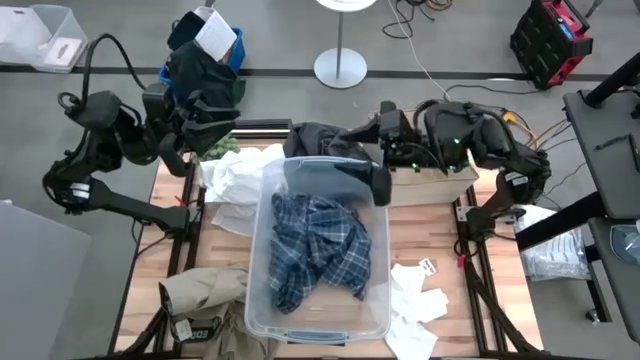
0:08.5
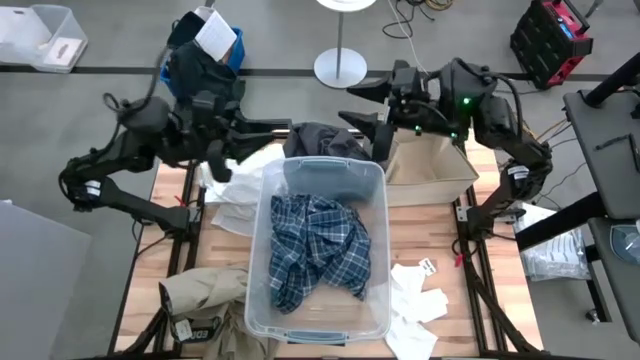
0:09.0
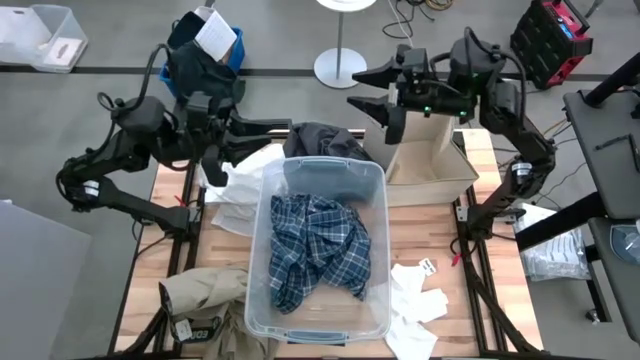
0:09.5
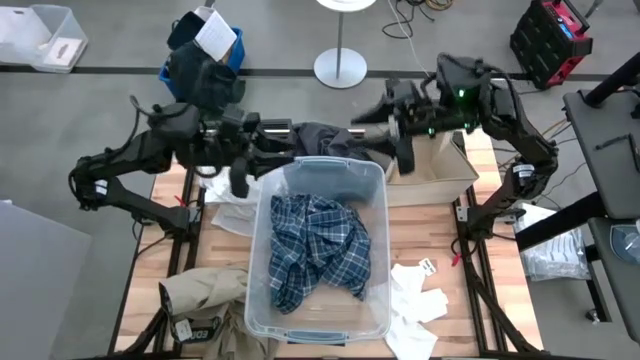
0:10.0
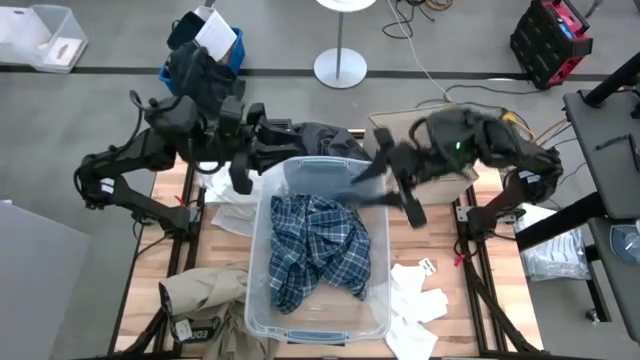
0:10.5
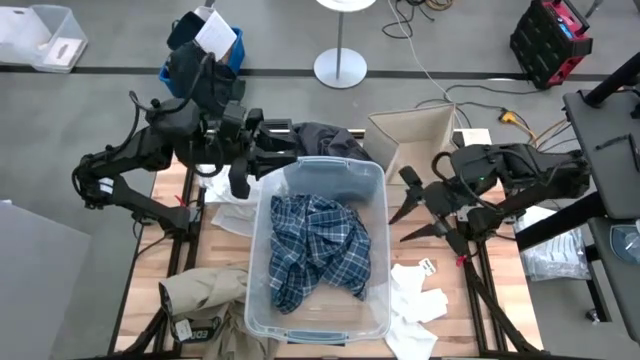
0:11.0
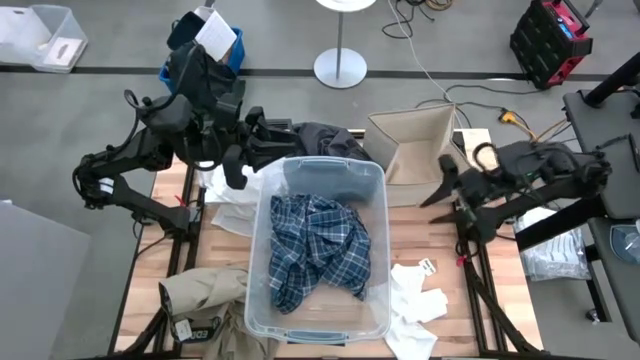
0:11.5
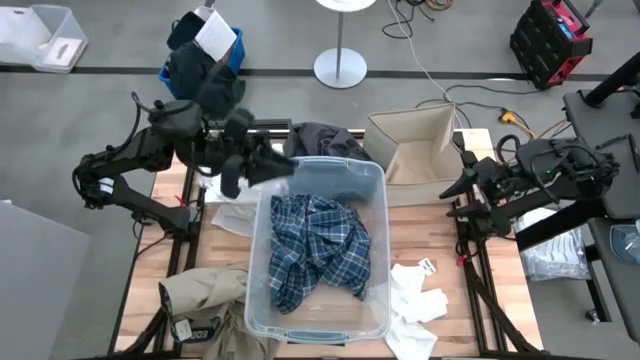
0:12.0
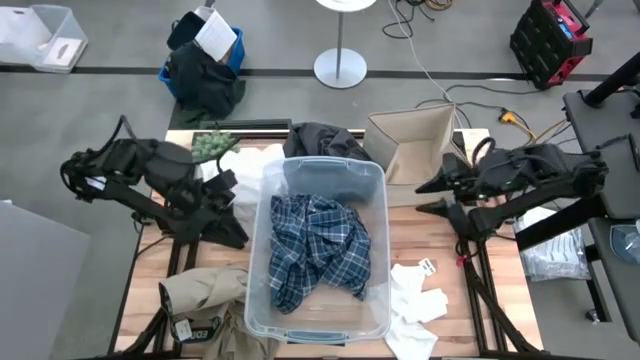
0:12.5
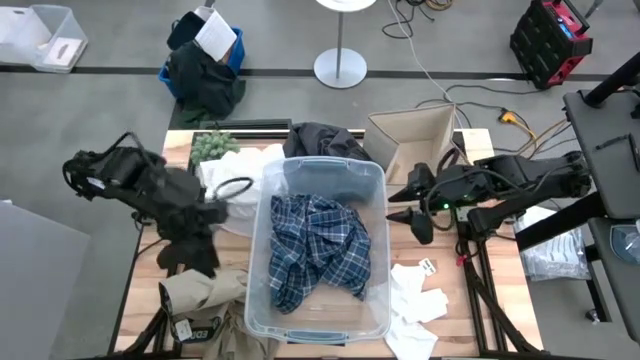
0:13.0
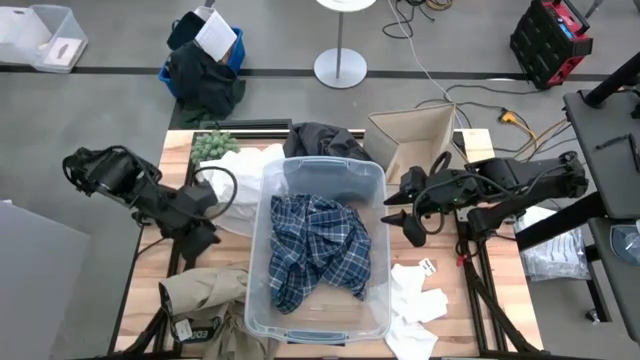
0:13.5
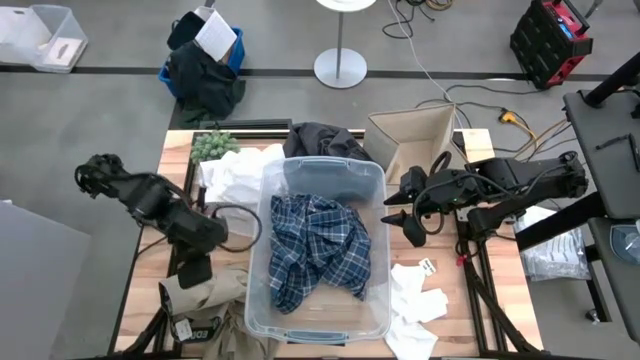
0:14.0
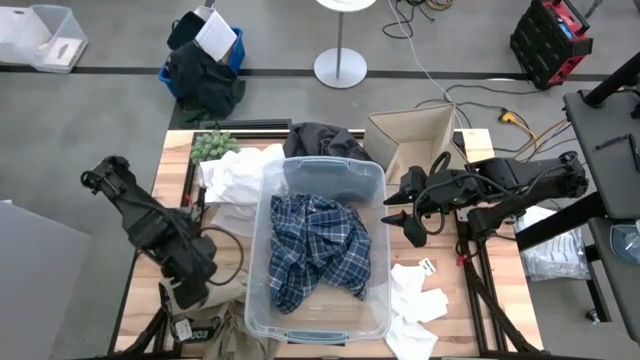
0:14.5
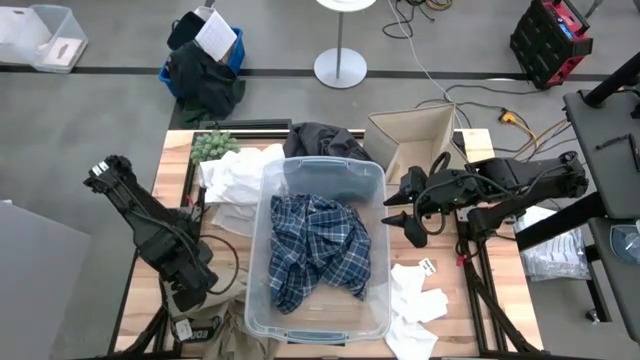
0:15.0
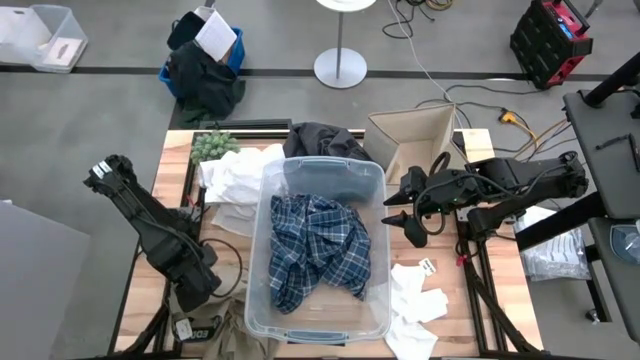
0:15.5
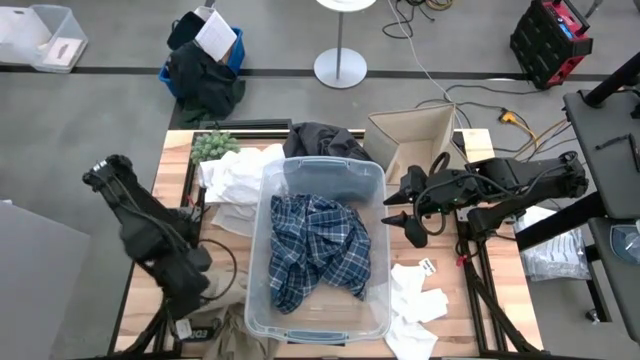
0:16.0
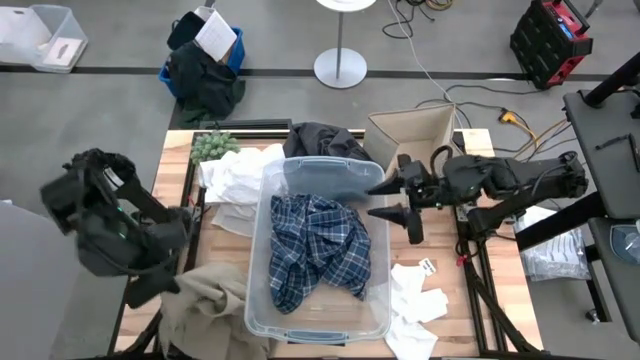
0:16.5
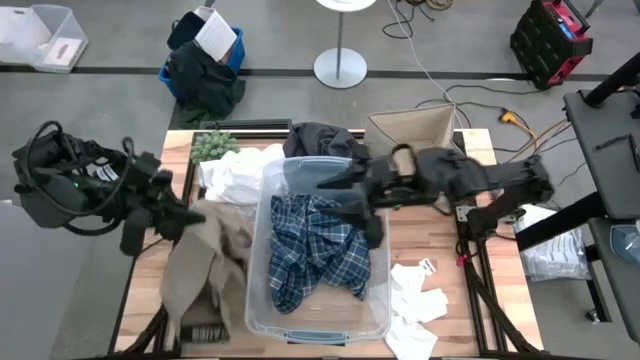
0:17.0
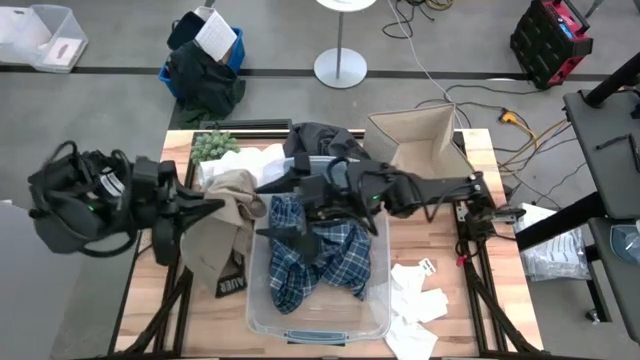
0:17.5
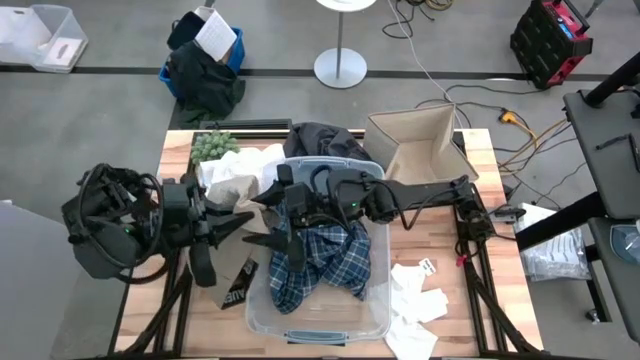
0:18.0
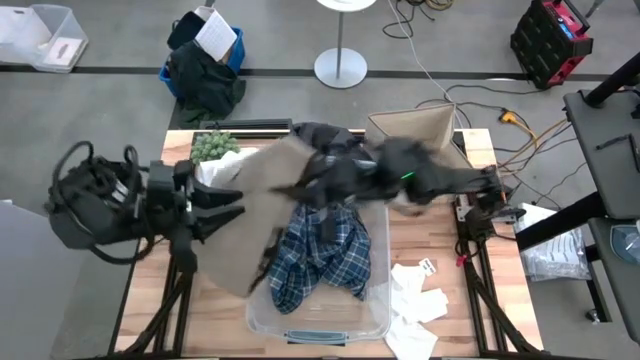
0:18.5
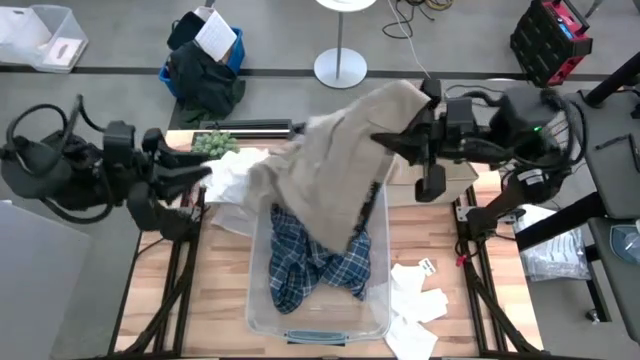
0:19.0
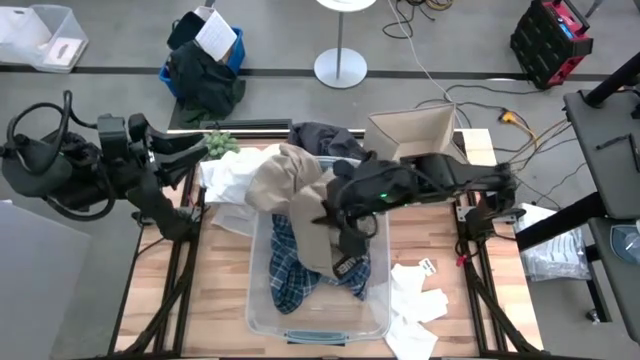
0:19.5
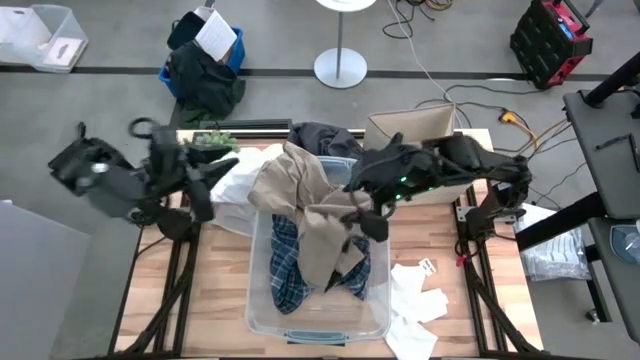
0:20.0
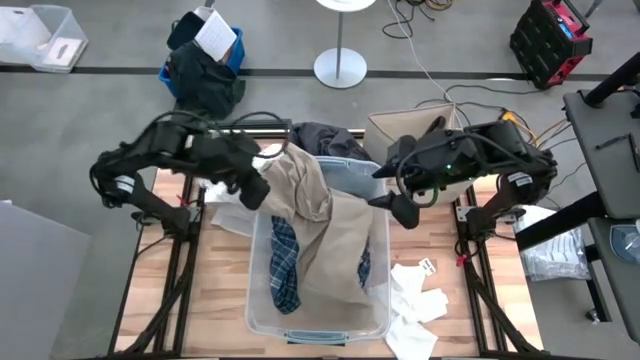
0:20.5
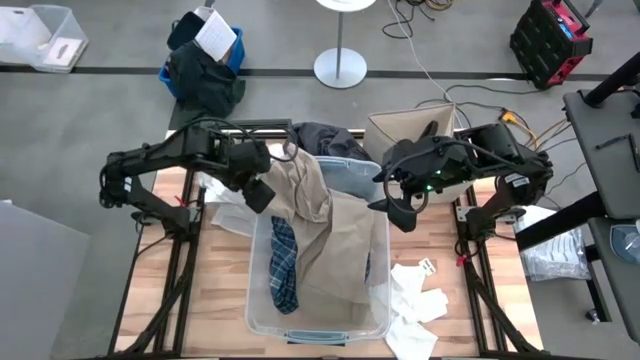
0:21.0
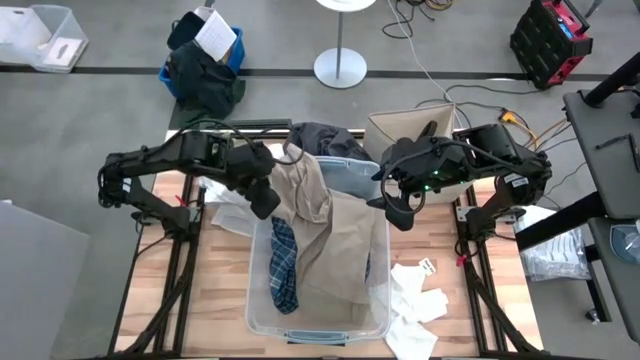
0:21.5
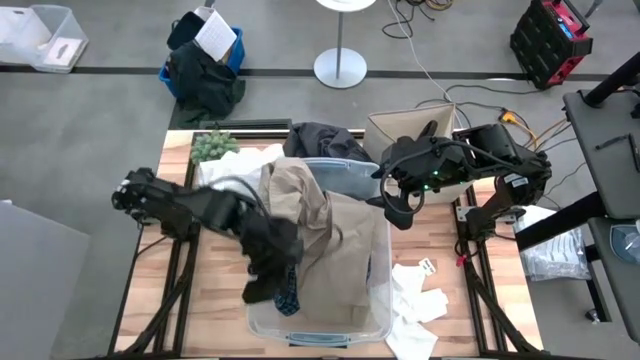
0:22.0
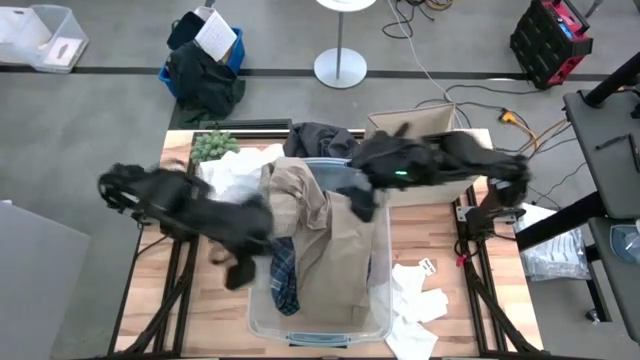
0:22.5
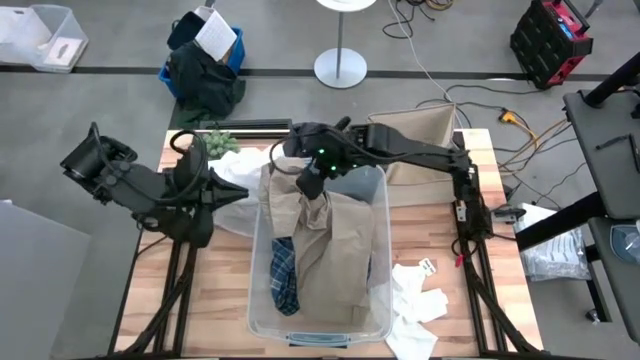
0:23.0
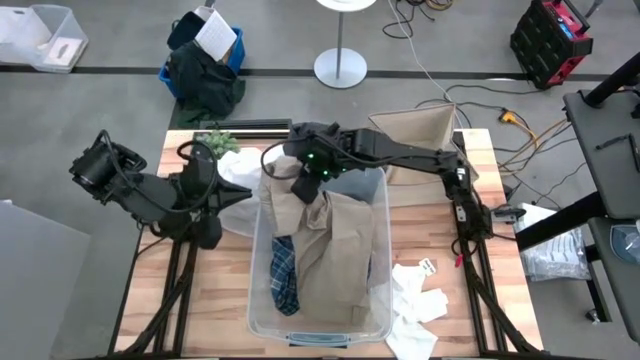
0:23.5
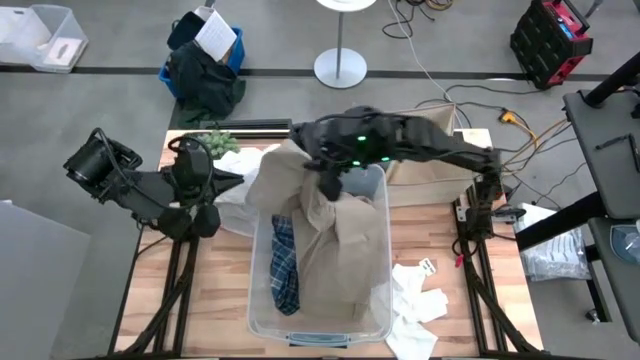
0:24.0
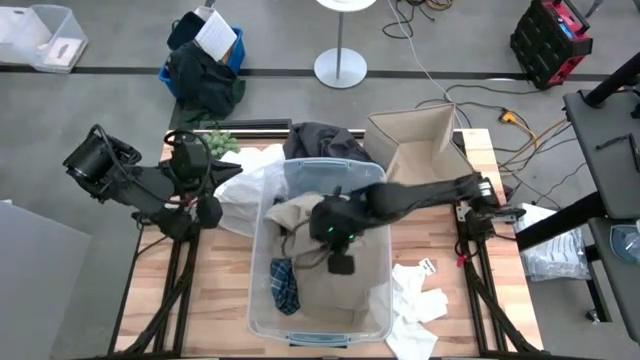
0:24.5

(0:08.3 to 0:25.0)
Task: Sort clothes
Put the brown shorts into the transparent bin

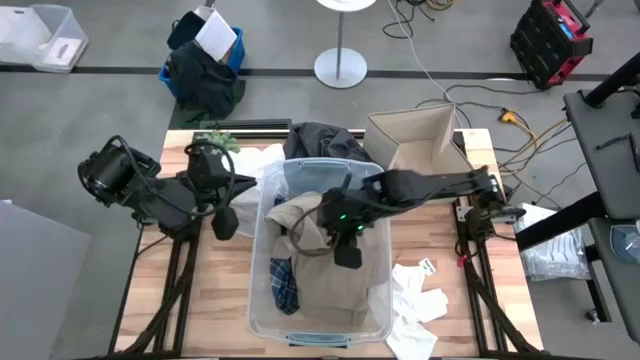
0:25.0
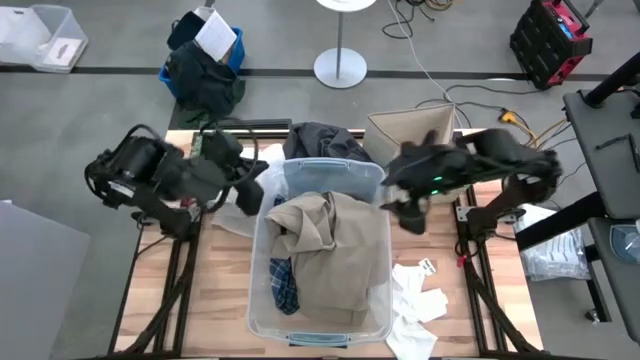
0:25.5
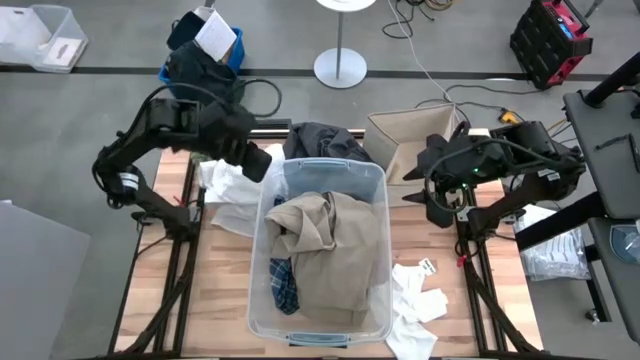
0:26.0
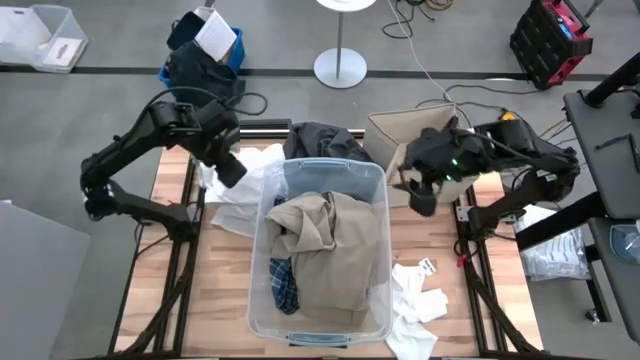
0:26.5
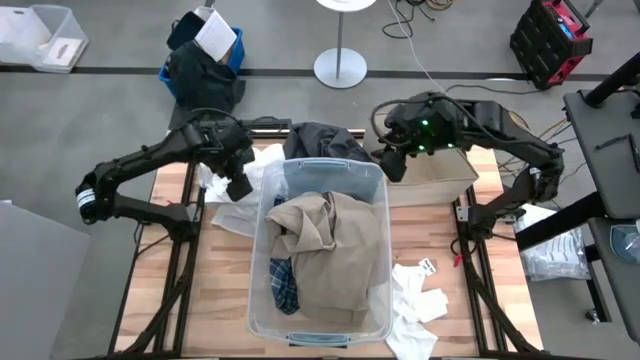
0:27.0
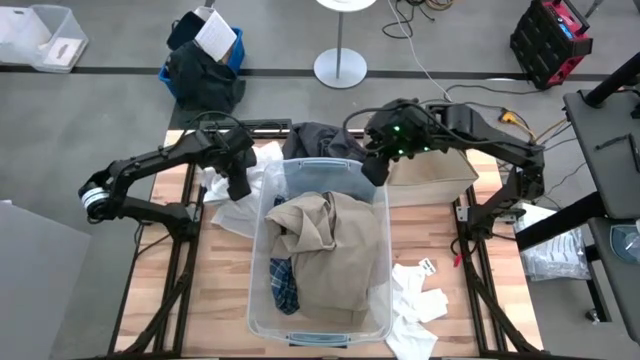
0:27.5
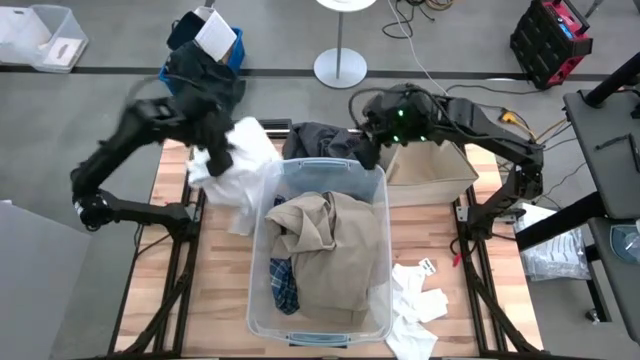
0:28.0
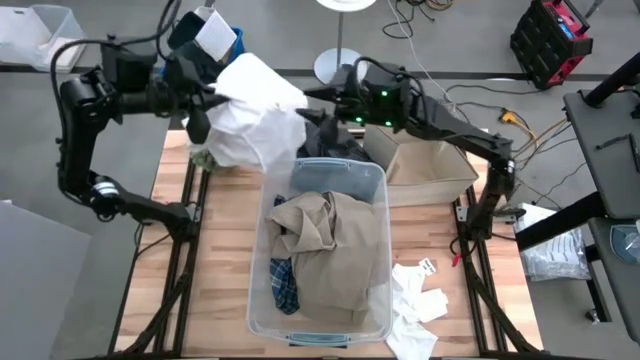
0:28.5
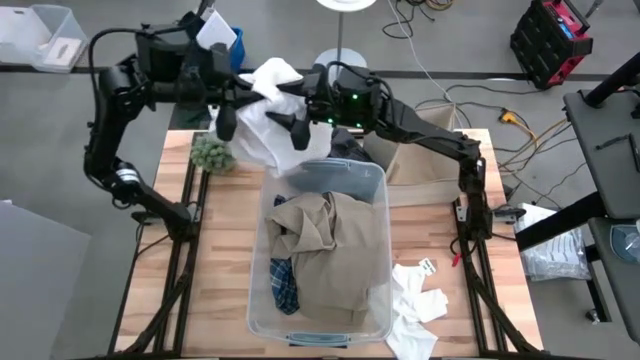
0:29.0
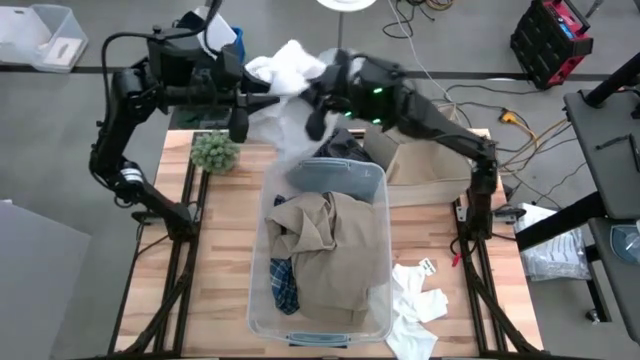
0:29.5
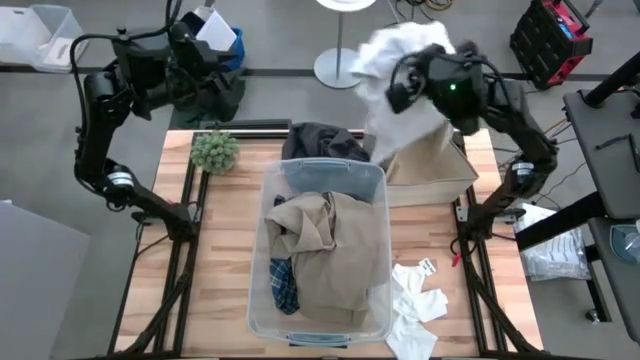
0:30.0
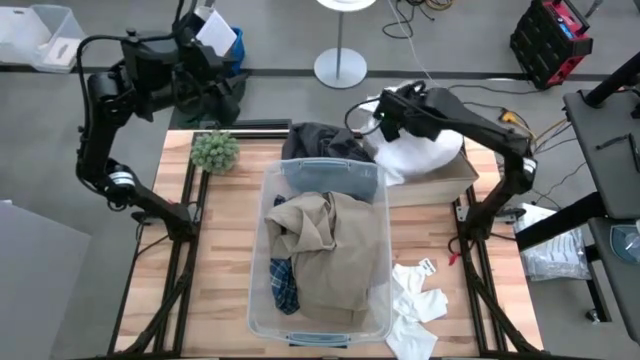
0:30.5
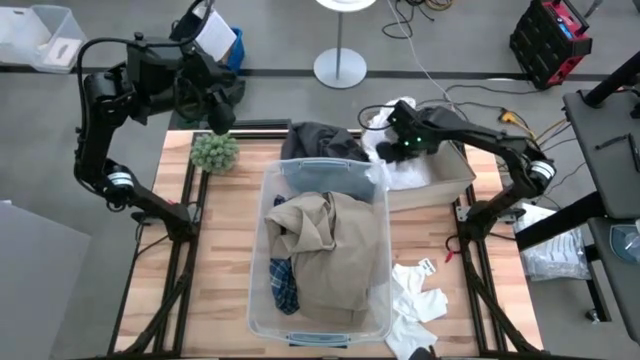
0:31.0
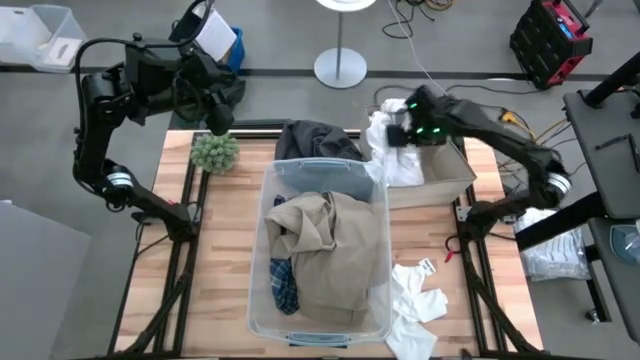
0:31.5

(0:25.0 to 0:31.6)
Put the white polo shirt into the brown laundry organizer
